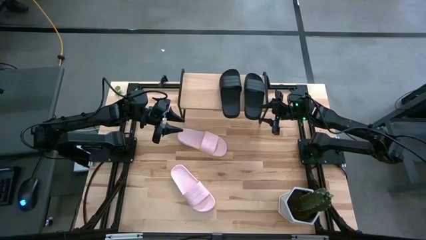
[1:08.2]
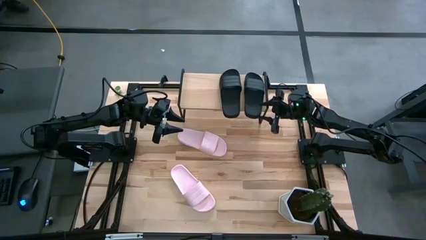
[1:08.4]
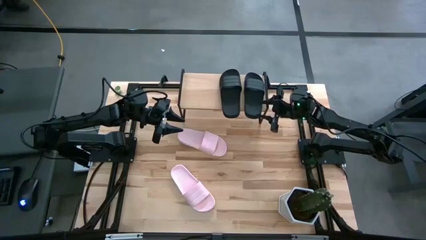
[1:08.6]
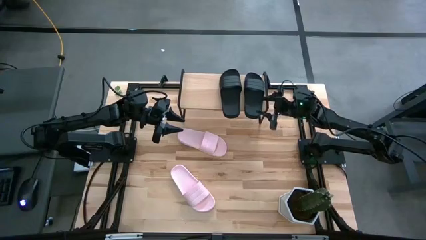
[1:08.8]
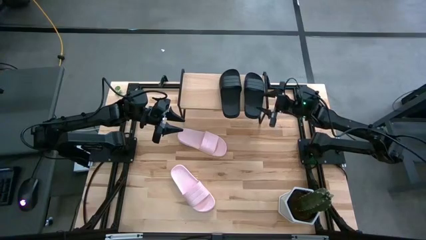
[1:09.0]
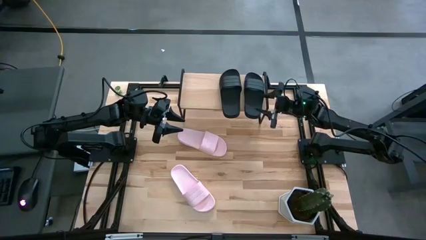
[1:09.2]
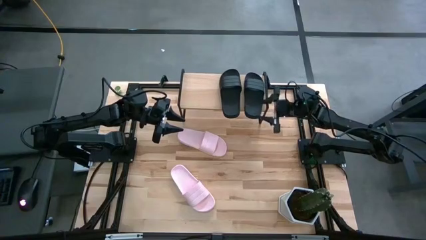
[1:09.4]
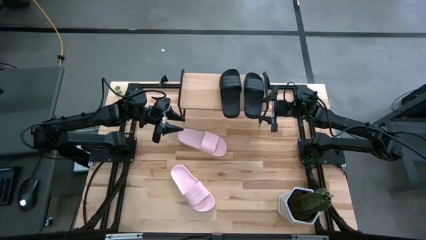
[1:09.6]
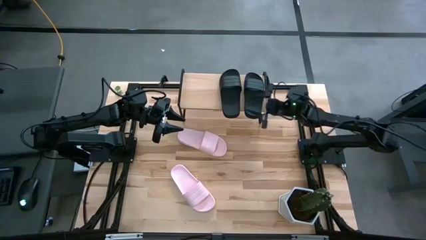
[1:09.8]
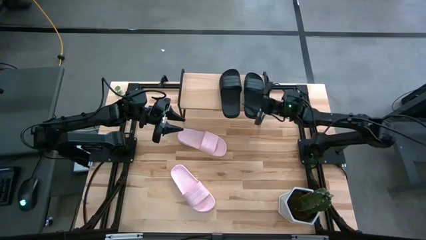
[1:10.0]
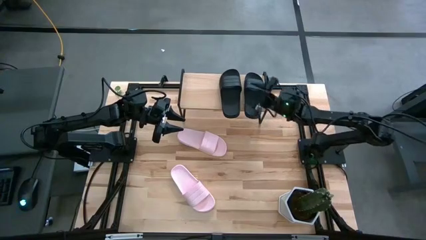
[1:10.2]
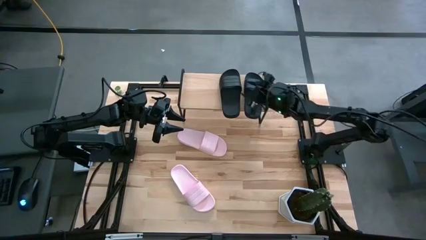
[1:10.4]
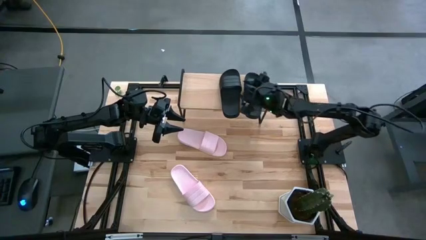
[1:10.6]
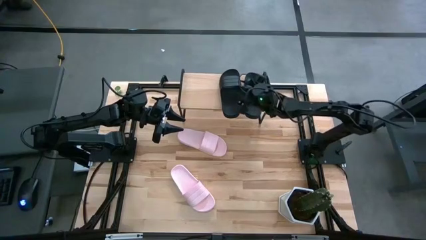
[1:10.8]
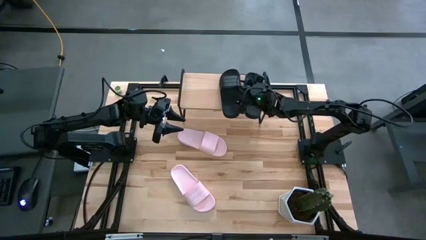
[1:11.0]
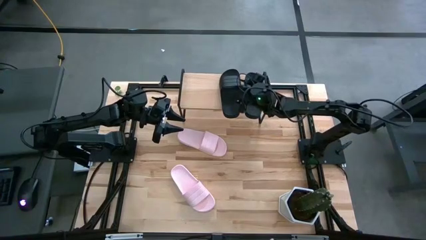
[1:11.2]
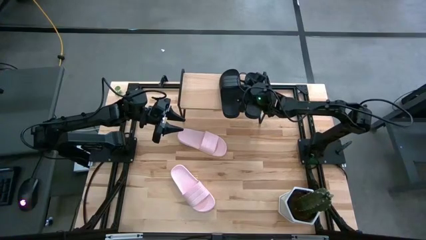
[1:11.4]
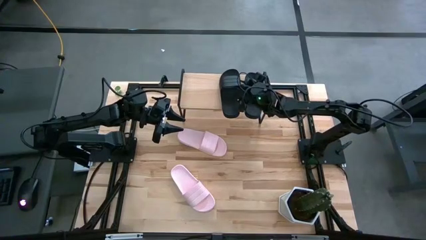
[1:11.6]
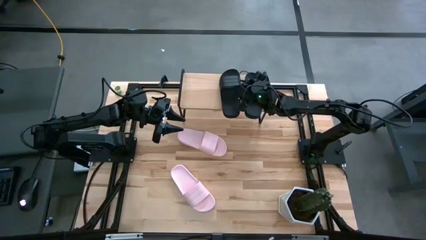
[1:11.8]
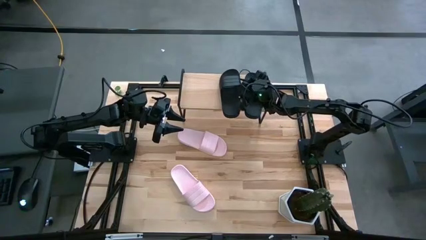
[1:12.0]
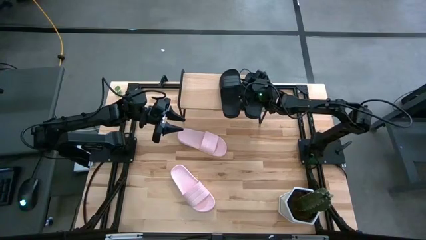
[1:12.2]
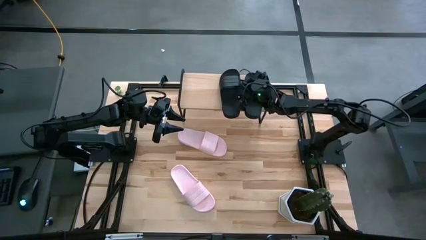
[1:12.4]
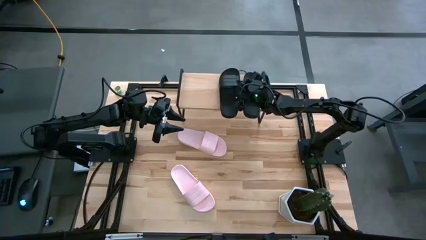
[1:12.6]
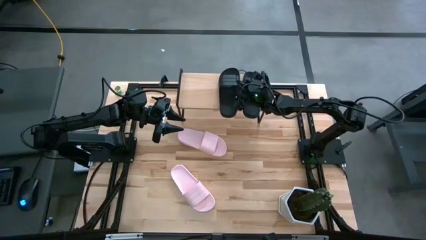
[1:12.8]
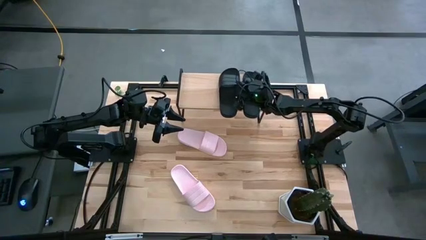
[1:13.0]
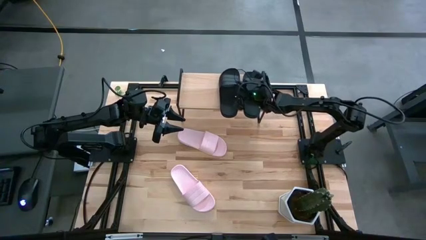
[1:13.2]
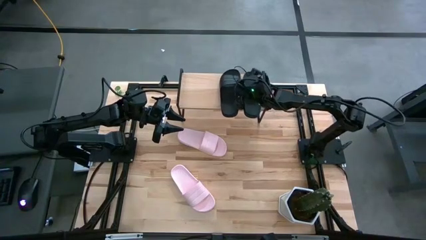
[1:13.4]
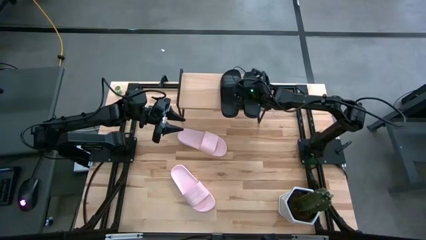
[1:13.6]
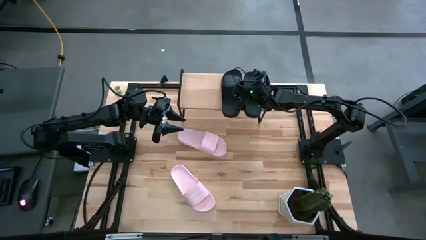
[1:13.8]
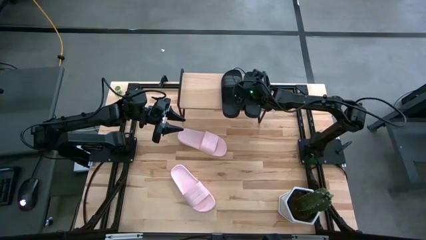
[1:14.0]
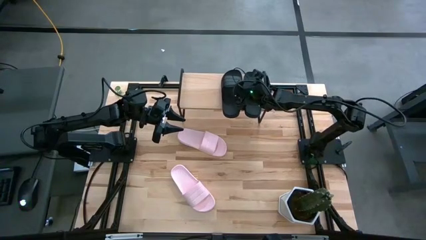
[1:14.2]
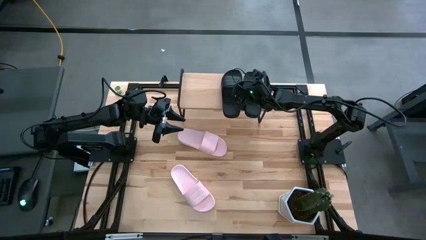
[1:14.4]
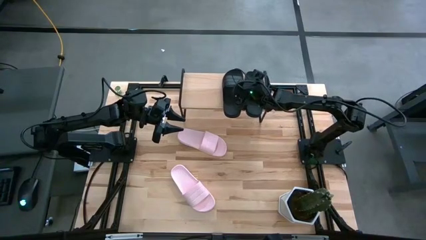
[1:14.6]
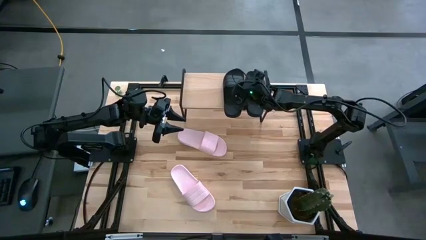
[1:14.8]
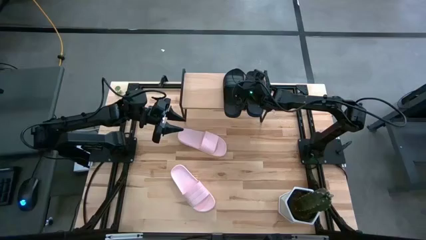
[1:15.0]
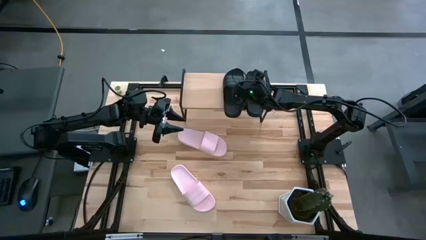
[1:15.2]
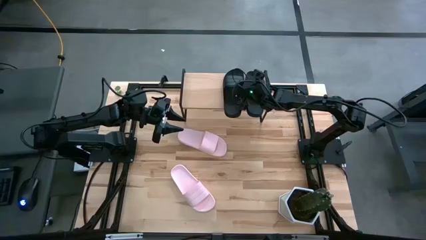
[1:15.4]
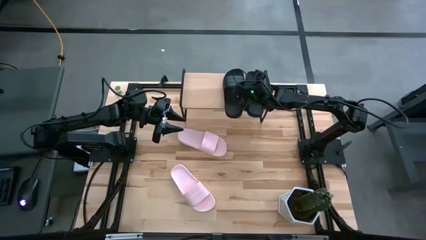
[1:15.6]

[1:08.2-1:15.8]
Task: Pick and place slides into the shelf
Adjust the left black slipper on the shelf

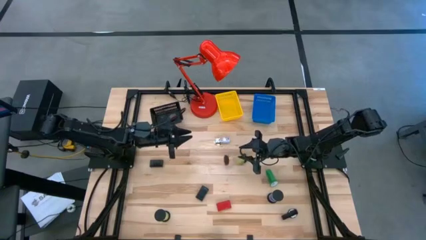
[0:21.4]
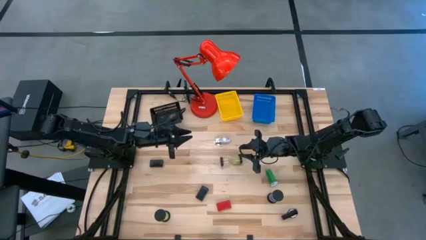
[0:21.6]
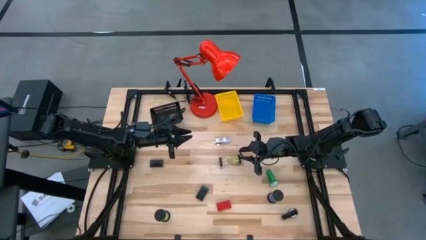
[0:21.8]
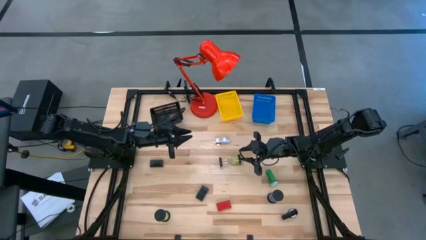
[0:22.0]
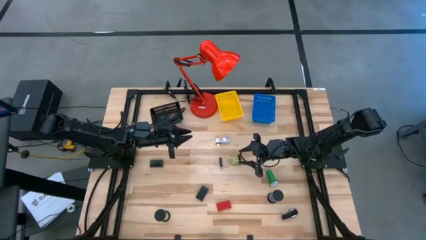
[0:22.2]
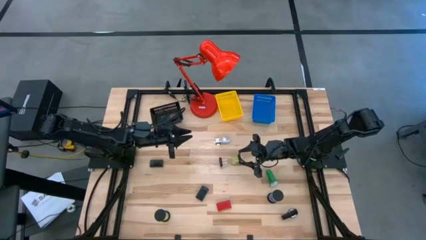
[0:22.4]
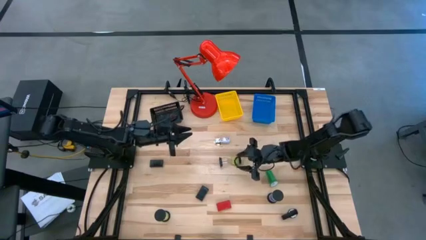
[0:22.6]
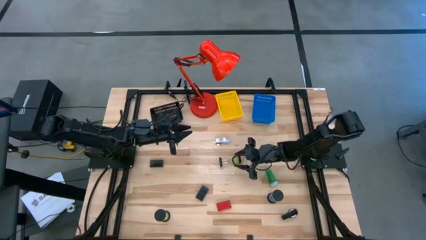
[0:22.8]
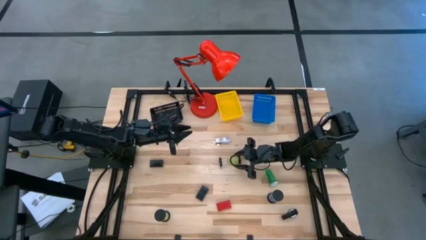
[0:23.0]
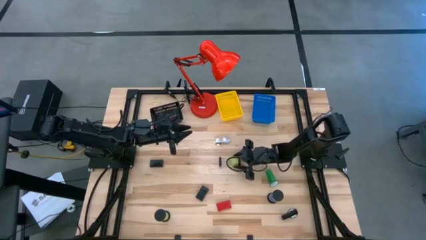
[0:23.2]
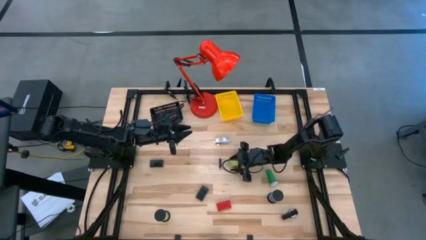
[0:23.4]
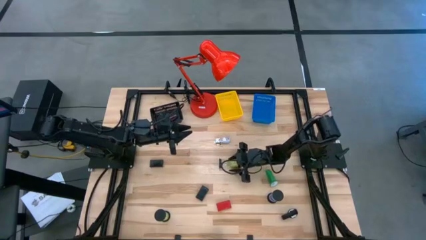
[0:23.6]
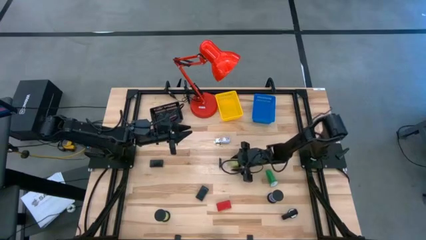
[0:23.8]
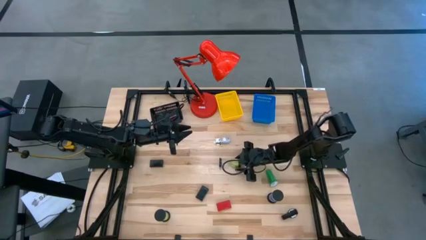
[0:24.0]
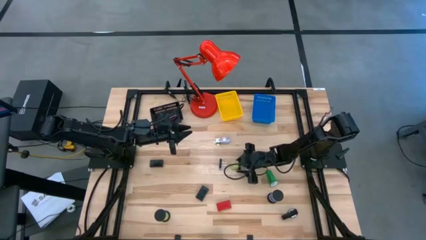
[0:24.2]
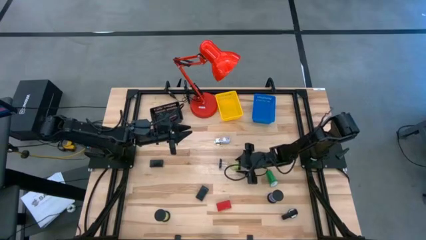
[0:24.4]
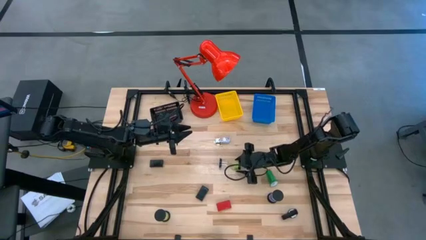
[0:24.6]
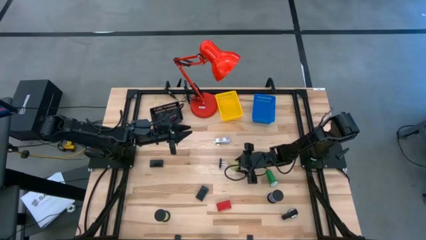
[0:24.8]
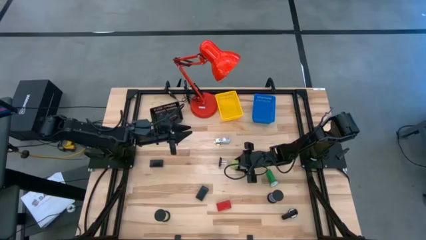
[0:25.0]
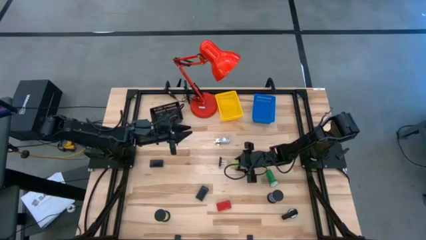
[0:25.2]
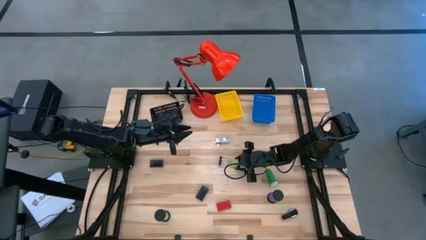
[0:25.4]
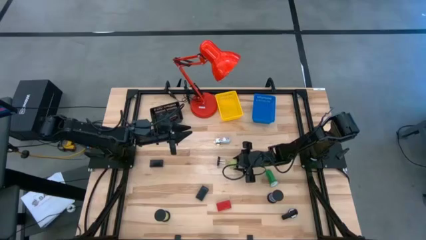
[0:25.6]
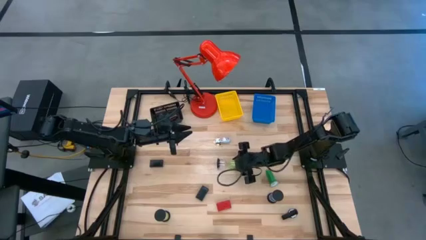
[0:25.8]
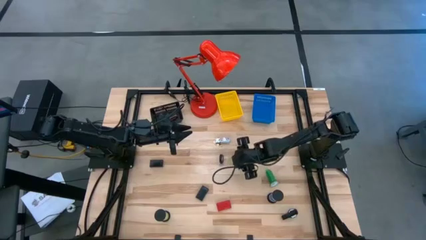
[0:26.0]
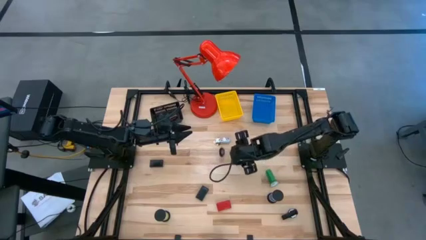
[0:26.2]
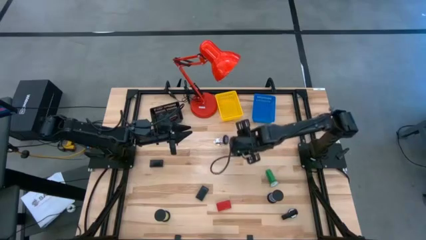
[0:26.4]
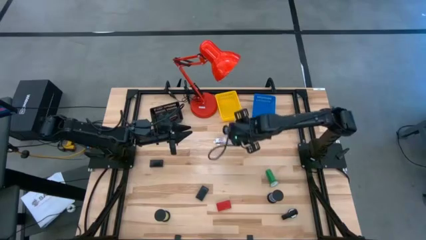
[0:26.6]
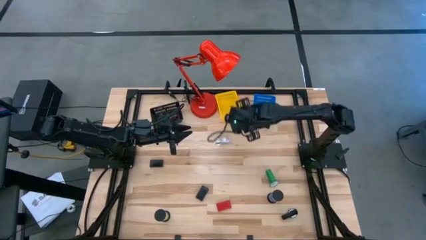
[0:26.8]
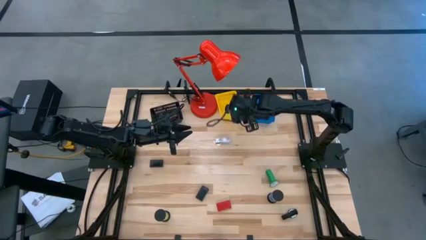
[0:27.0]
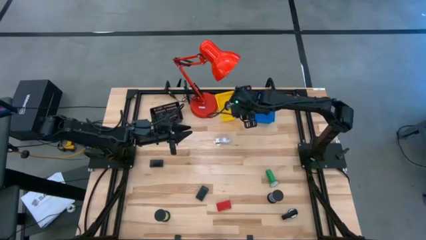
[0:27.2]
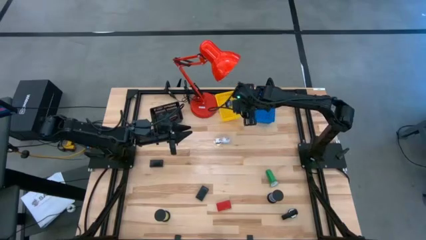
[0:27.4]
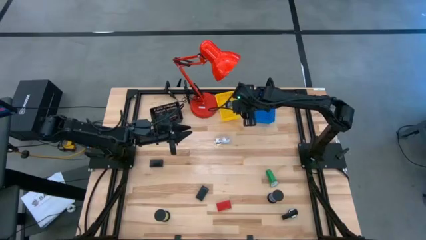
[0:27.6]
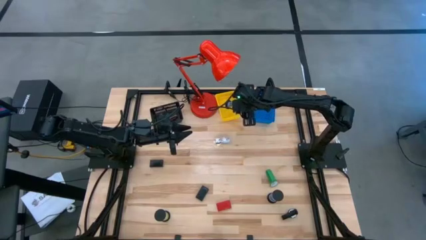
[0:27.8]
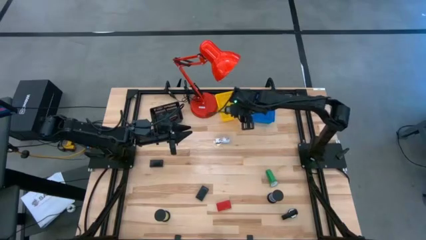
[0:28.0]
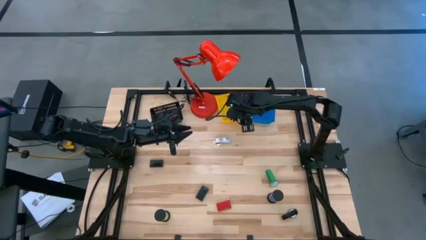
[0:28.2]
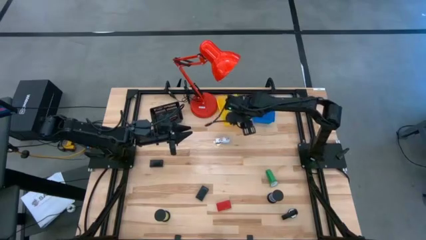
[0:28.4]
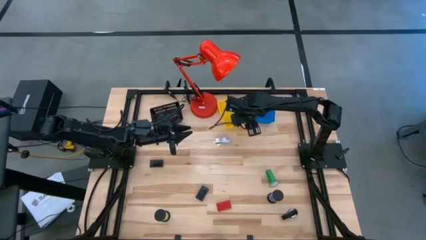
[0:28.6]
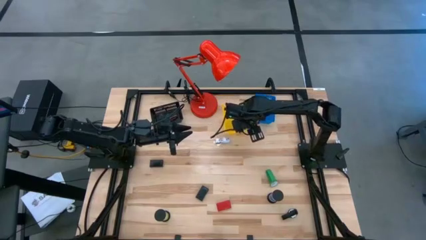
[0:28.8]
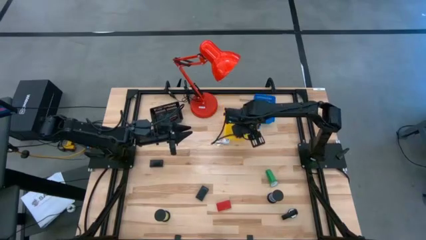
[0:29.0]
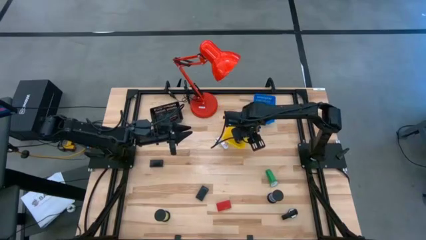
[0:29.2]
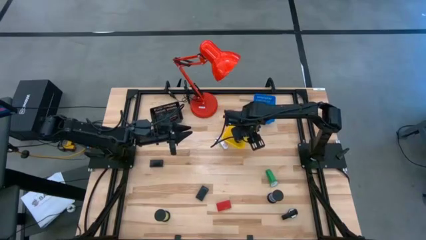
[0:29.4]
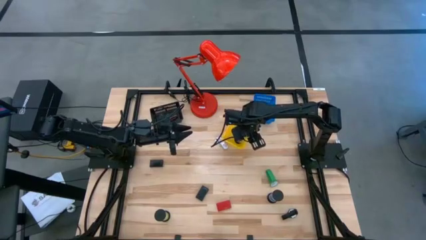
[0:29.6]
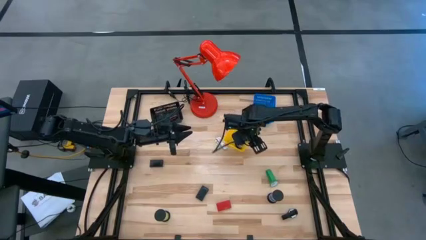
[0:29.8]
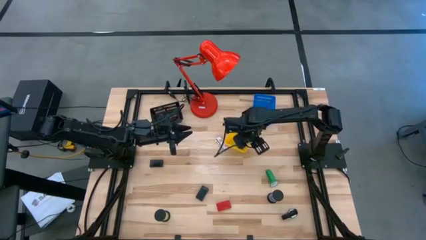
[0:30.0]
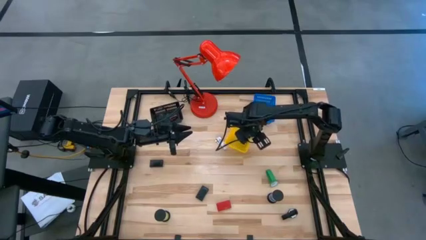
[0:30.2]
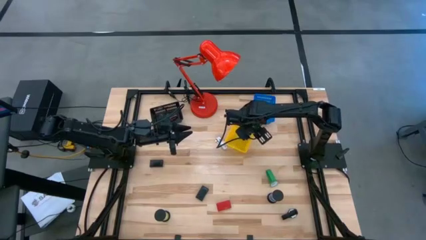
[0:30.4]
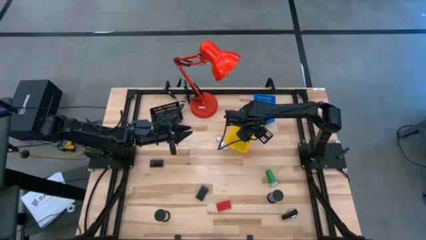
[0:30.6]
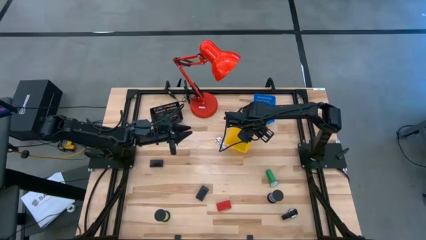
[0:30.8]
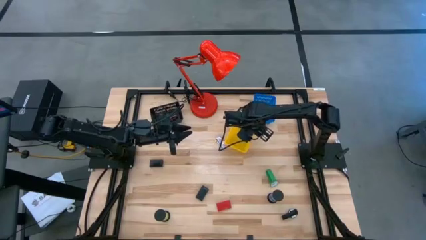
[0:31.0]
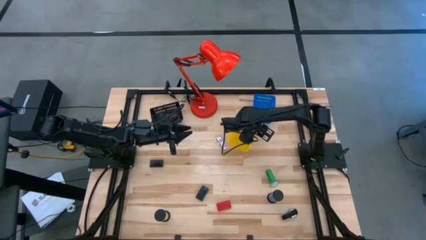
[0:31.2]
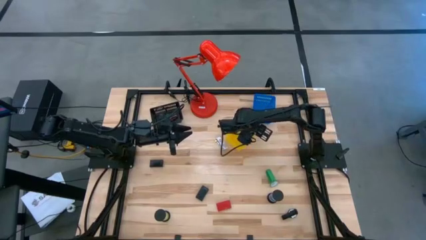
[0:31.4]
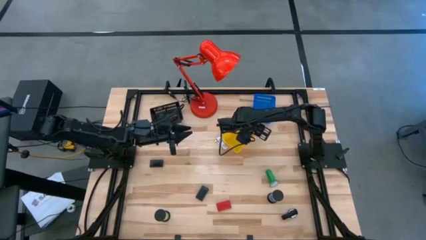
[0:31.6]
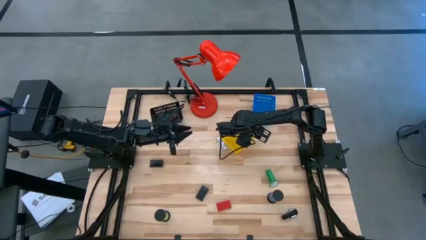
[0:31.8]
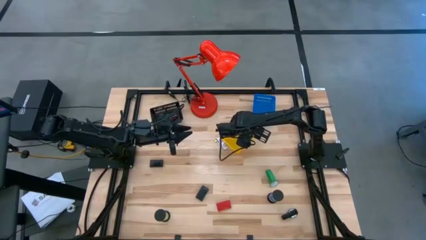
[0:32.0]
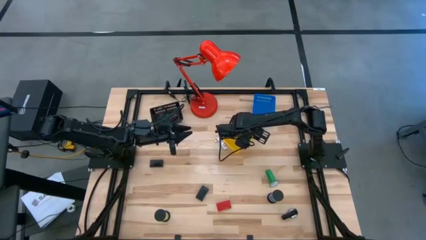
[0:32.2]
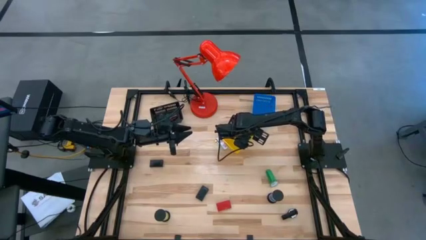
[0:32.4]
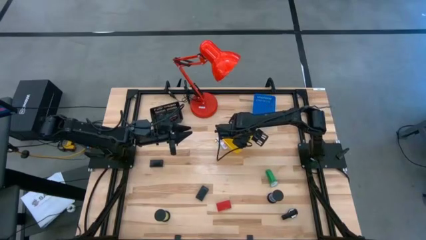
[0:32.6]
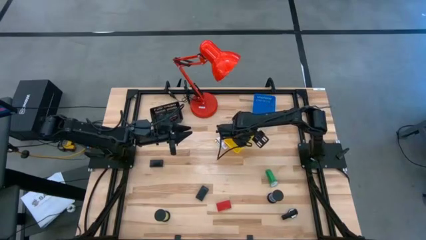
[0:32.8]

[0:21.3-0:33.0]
Task: Pick & Place Office items
Put the light green hourglass into the yellow bin
